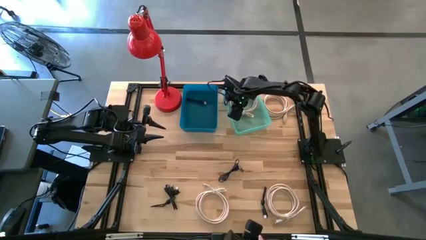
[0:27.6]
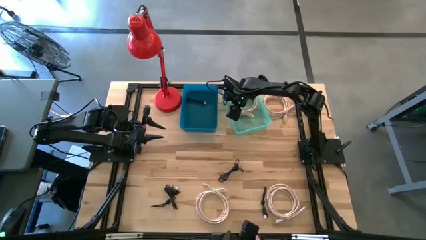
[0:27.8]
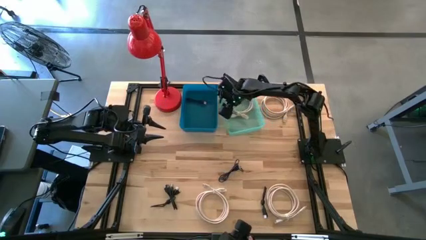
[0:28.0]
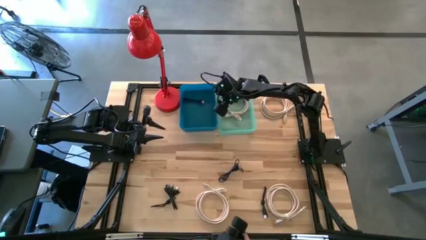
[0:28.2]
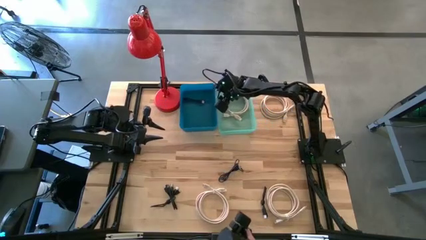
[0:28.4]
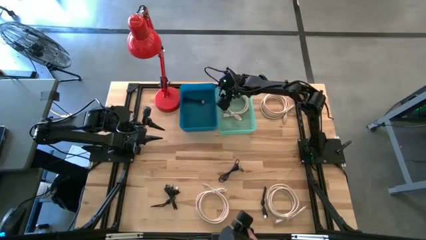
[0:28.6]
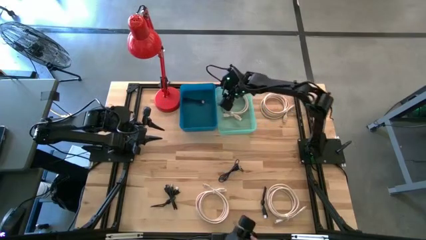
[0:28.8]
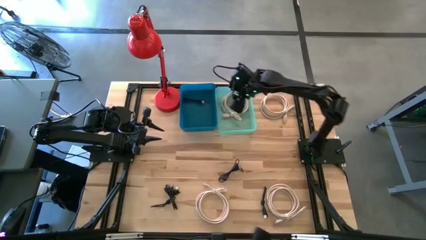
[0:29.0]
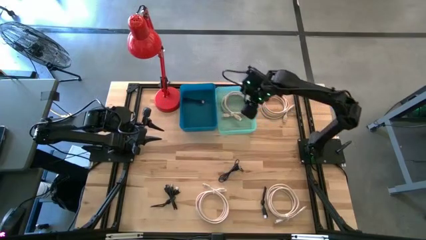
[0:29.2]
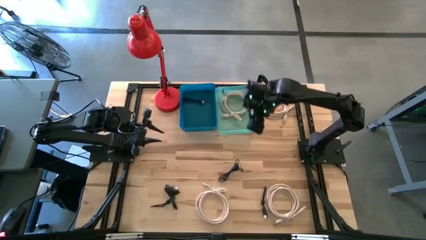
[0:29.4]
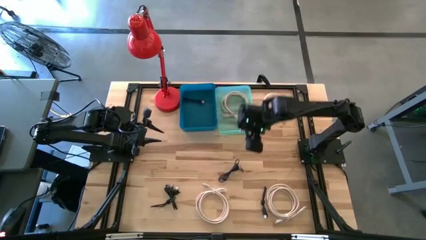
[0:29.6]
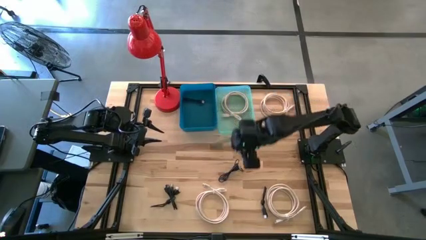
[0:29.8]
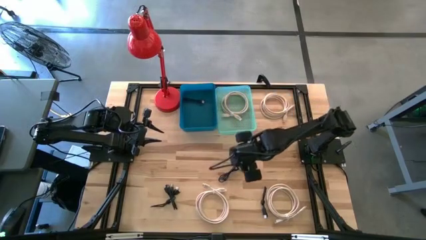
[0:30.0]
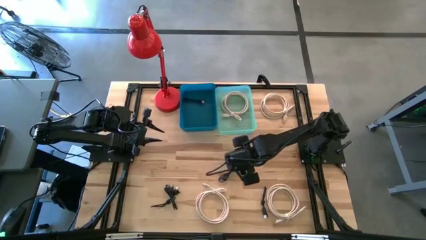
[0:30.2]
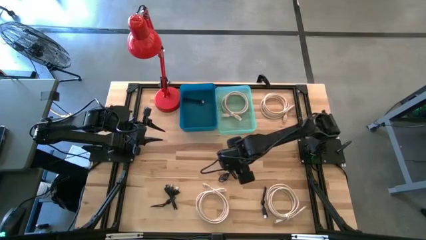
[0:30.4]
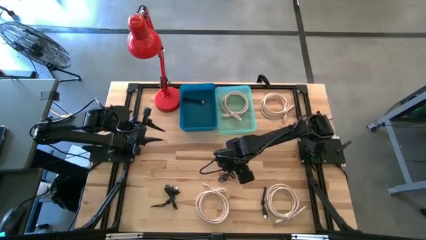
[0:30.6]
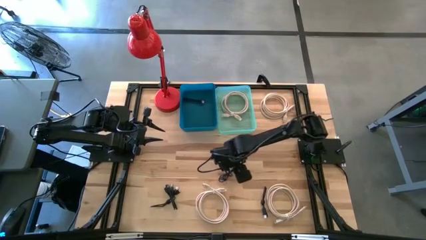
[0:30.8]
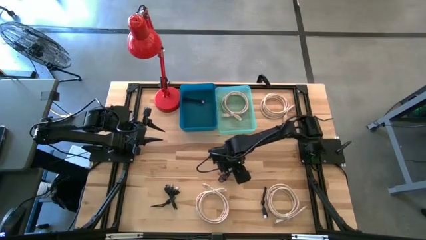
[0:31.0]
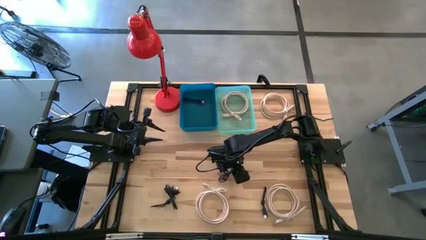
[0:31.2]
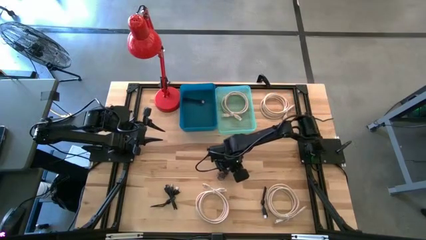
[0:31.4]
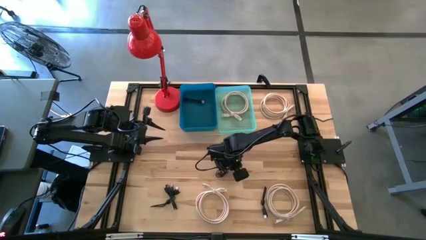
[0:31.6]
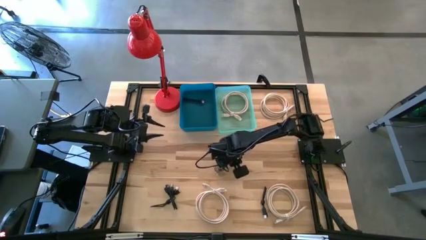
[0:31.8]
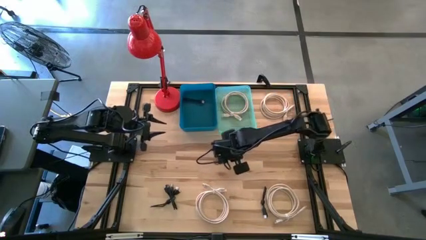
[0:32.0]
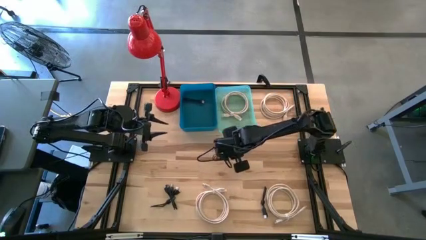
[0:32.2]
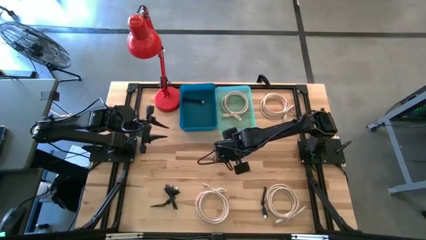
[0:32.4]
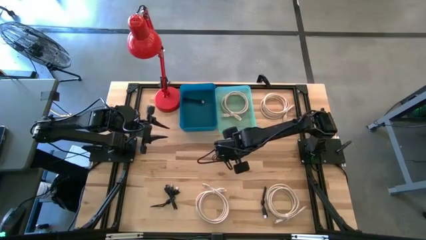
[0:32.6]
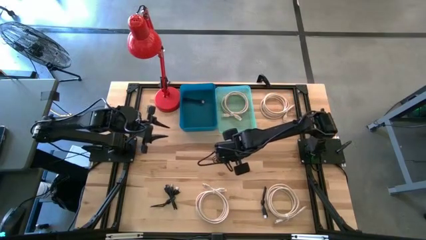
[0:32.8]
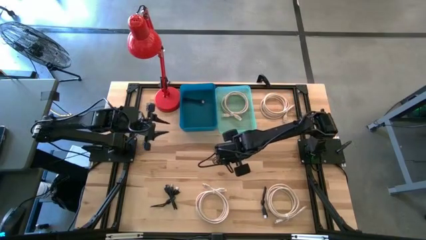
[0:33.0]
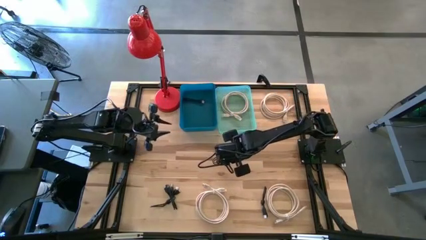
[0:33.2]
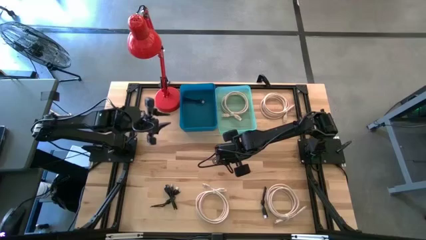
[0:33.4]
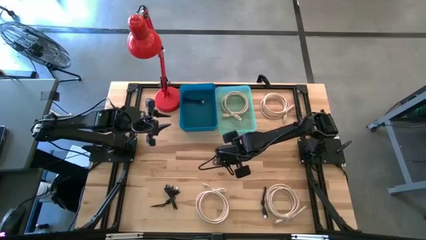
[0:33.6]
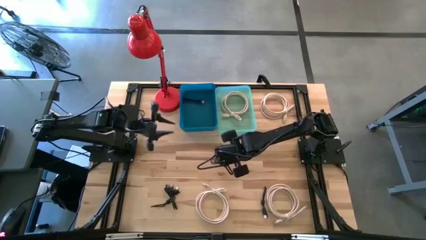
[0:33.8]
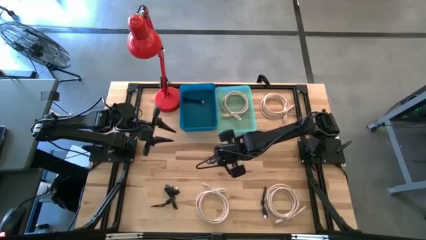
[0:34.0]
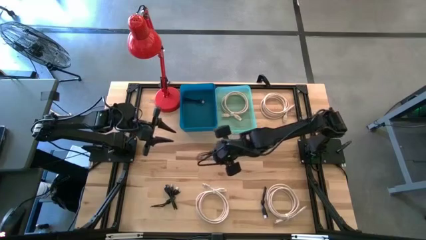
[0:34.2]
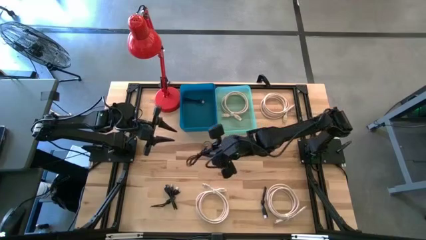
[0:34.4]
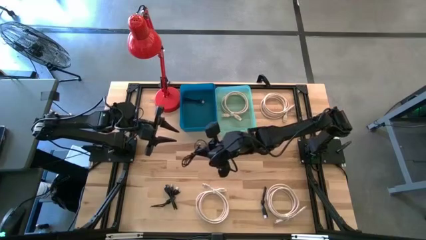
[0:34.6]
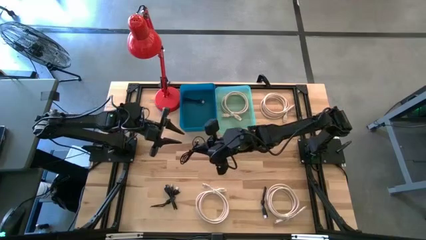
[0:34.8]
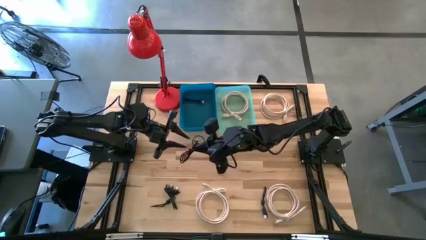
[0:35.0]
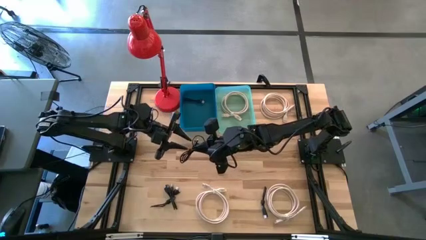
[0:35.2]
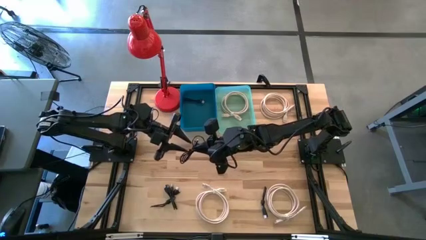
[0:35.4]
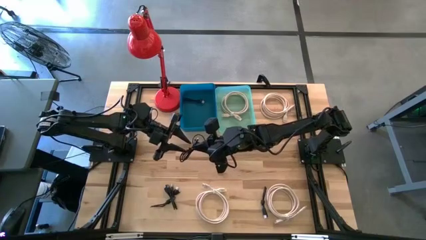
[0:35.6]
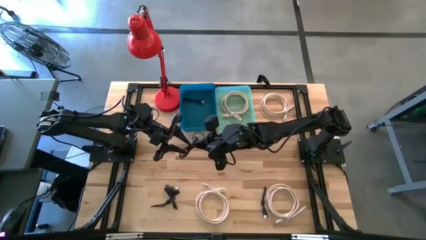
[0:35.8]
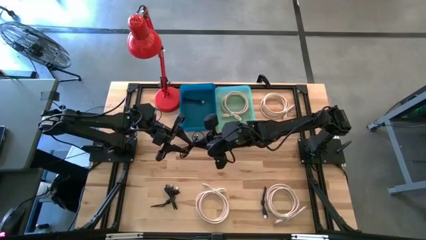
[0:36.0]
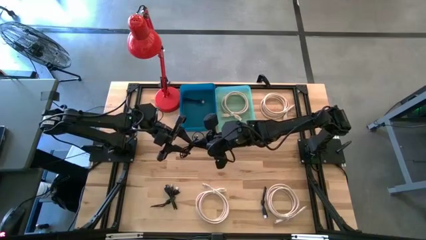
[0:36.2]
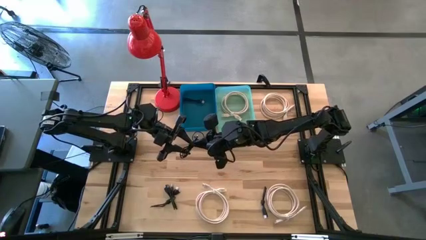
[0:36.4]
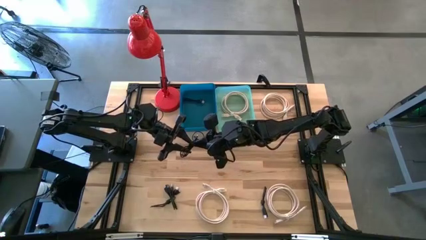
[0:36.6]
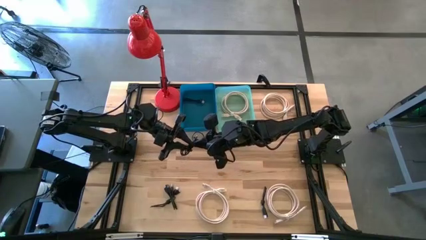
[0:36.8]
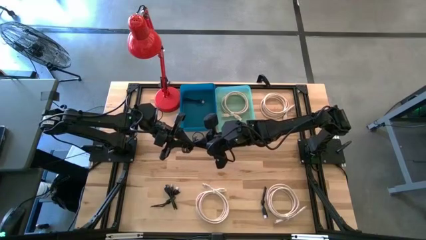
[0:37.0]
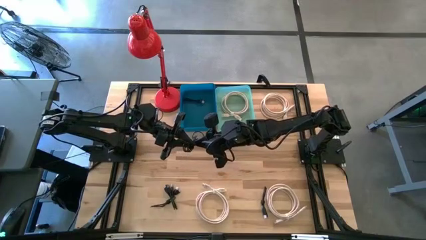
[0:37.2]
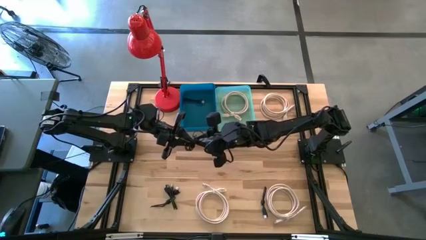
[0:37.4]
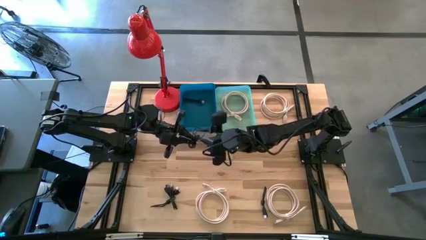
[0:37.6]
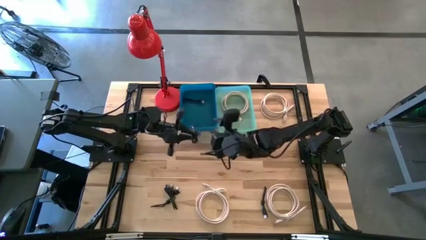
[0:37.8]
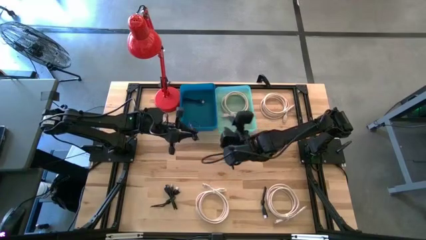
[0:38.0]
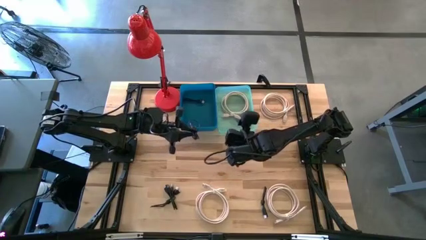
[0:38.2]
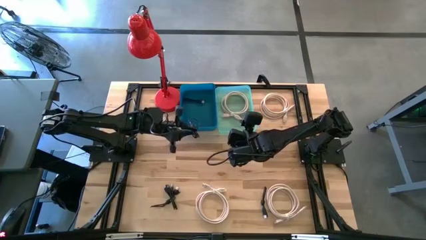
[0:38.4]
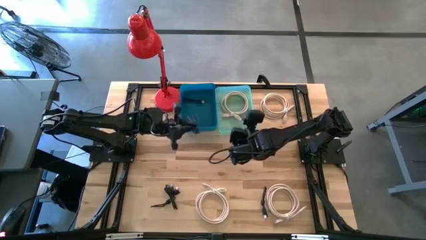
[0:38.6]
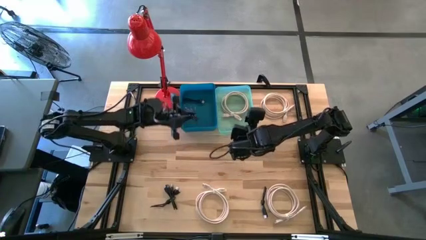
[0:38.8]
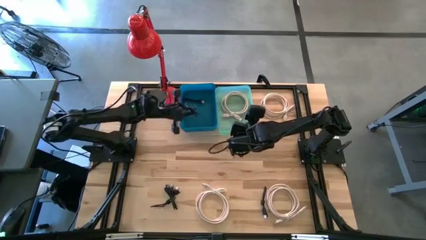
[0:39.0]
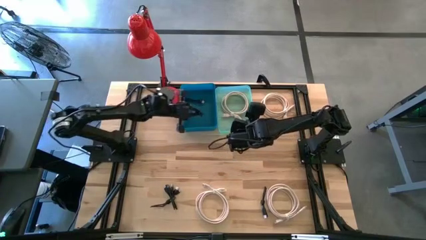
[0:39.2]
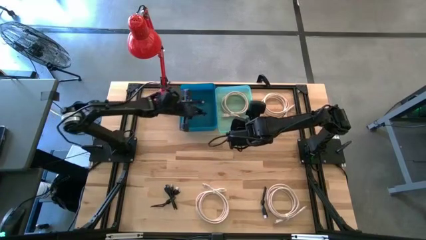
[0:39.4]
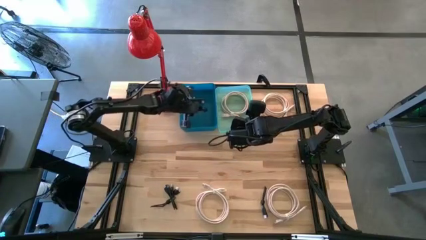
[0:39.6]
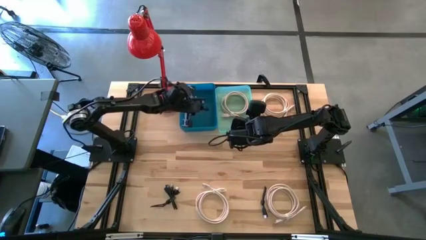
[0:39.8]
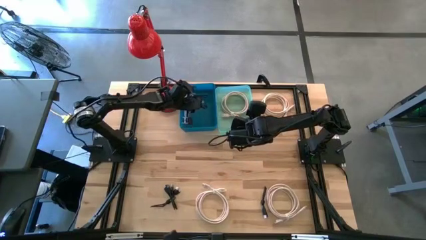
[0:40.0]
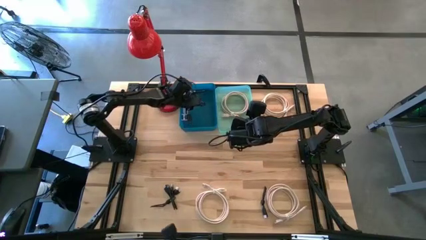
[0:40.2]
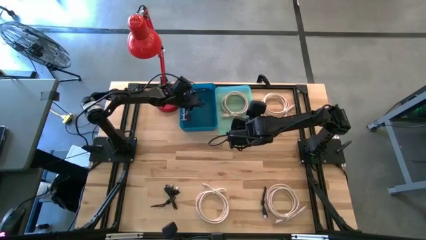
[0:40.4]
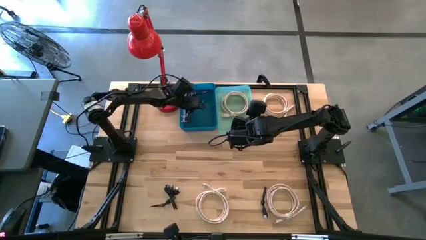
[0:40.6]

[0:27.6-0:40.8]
Task: Pick & Place USB Port
Put the black USB cable into the blue bin

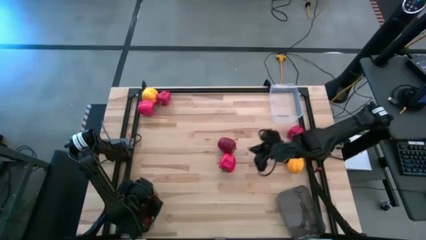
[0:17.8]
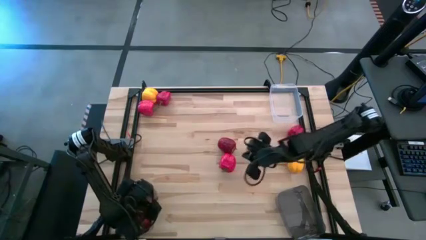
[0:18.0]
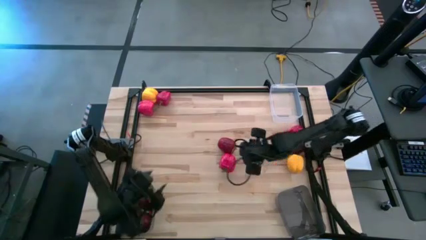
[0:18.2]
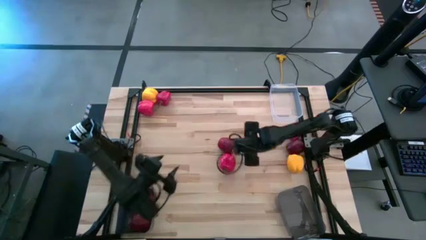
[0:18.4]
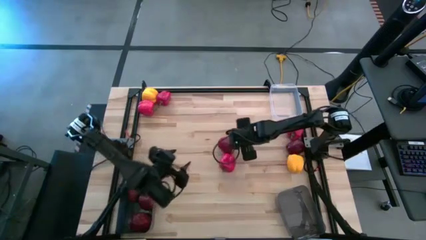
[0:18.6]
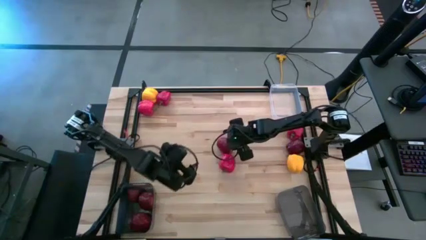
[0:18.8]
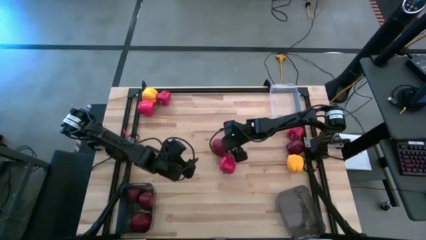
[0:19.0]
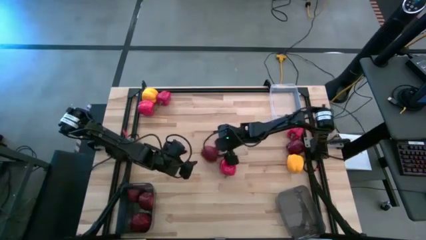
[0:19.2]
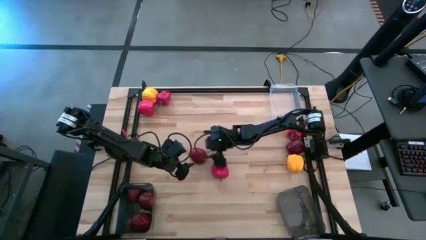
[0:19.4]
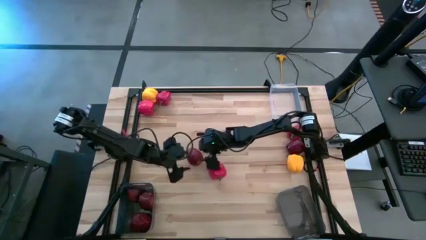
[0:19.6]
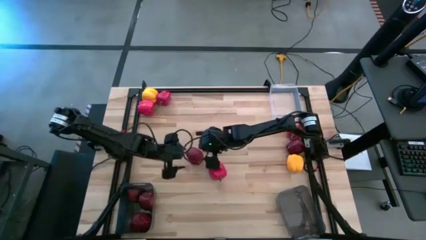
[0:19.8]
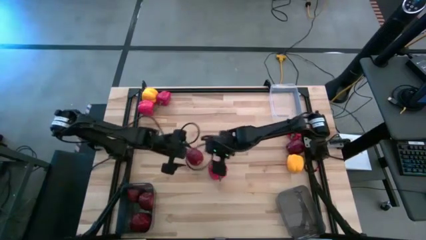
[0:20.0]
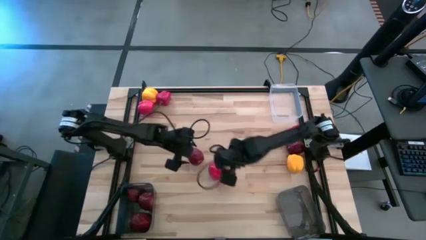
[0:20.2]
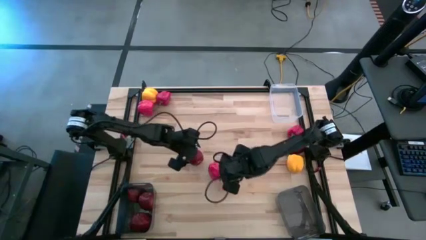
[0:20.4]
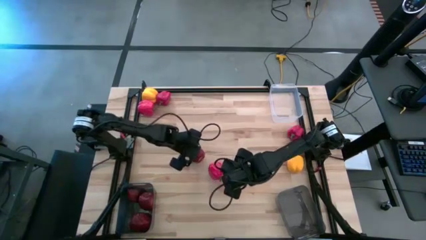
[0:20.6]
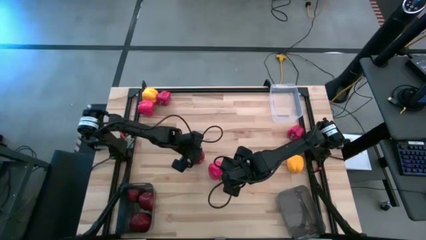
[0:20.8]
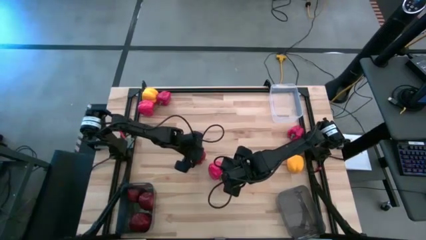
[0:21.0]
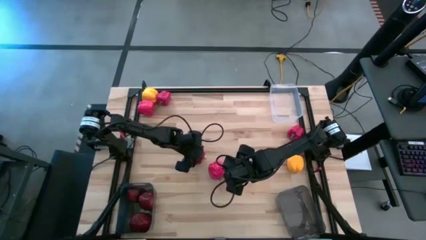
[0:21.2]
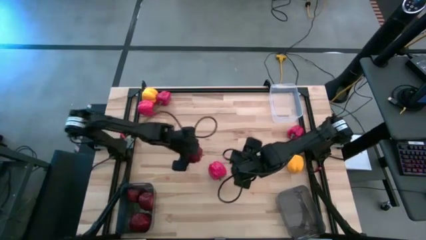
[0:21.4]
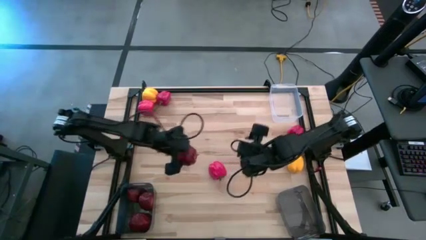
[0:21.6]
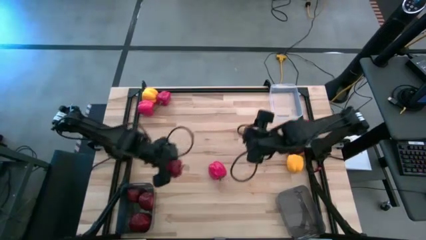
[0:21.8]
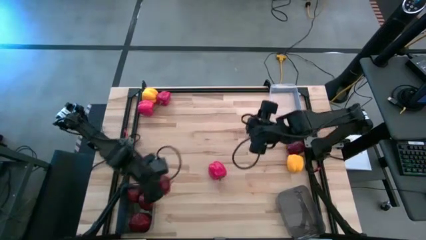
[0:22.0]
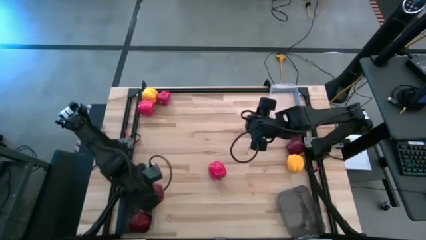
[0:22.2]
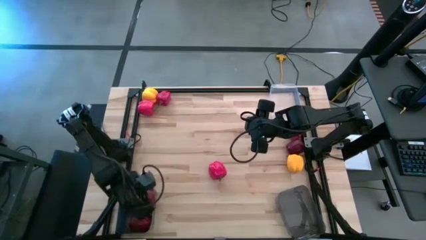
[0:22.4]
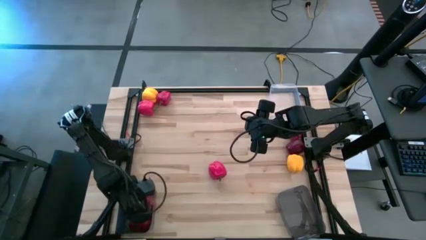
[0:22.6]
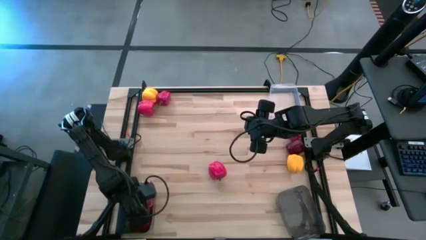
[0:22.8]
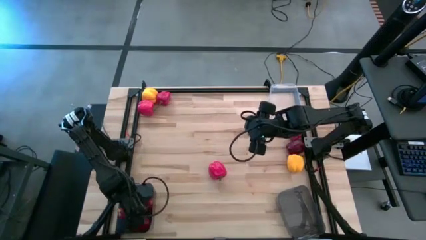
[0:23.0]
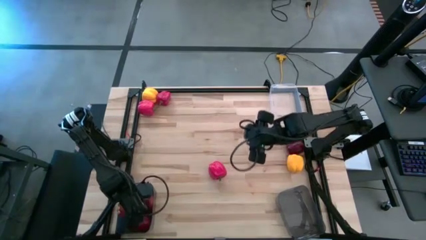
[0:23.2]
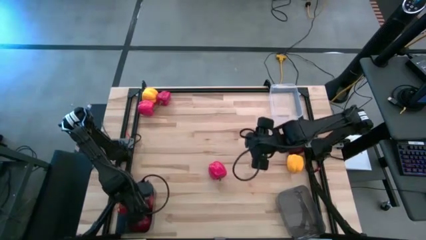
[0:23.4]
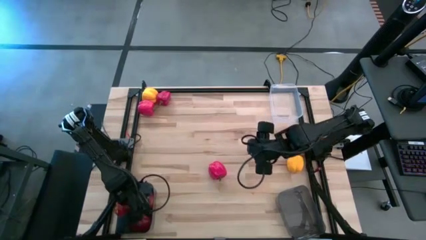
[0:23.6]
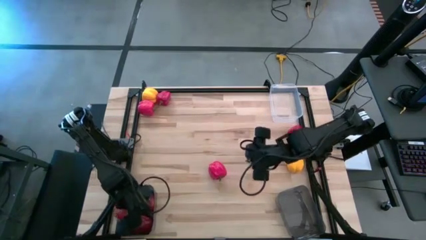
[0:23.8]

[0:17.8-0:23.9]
Task: Sort produce into baskets
Put the dark red apple into the left black bin
